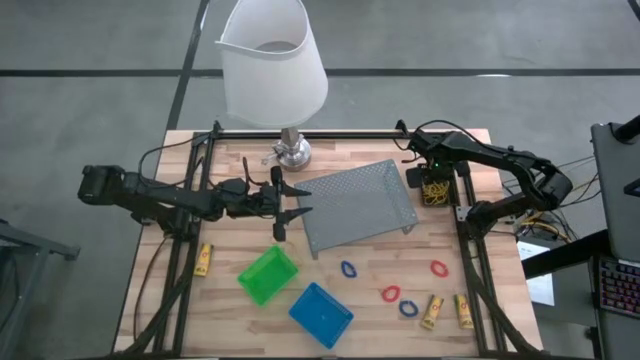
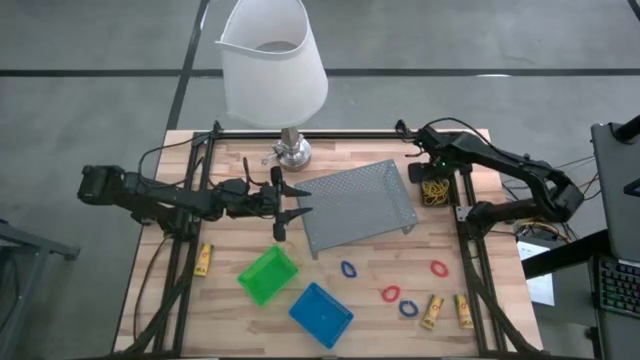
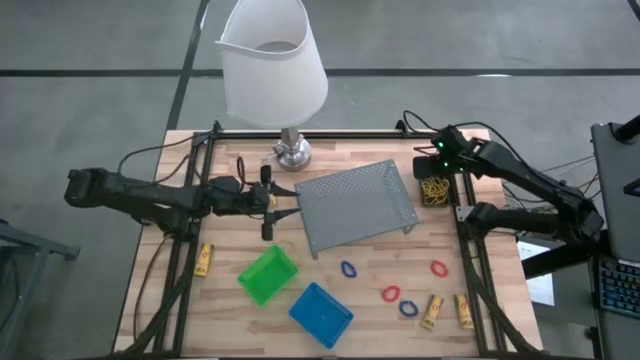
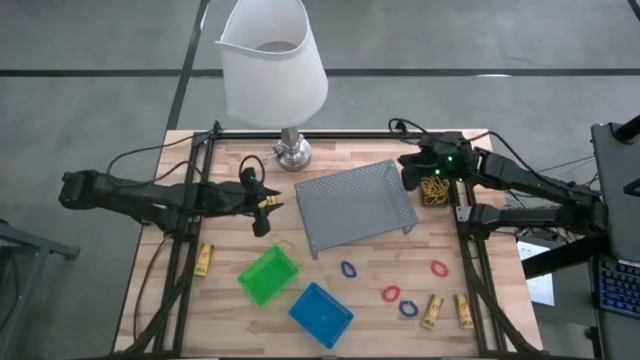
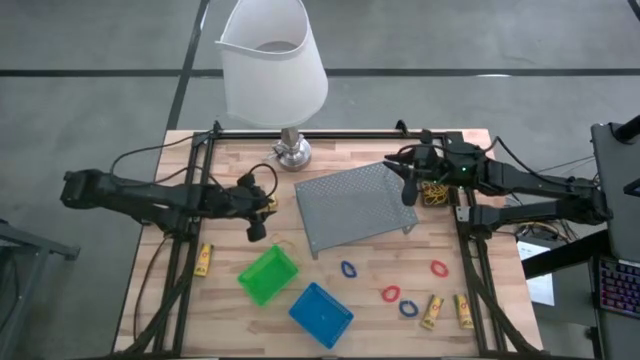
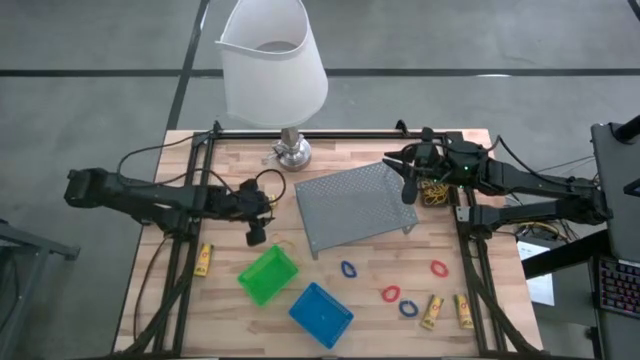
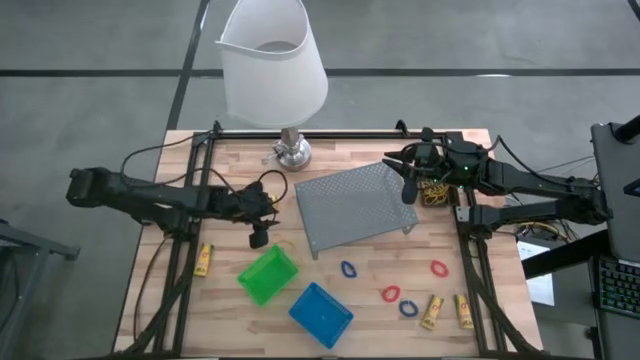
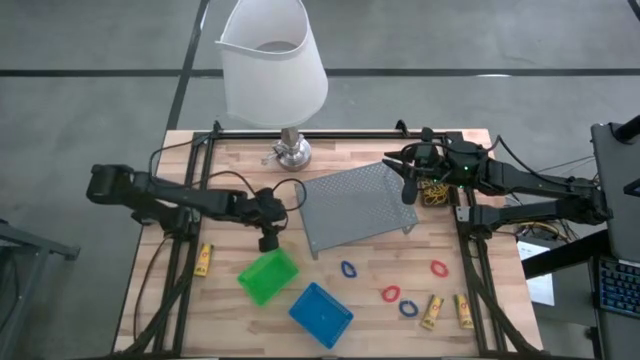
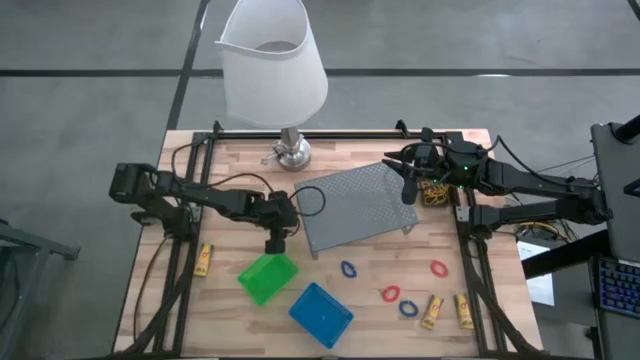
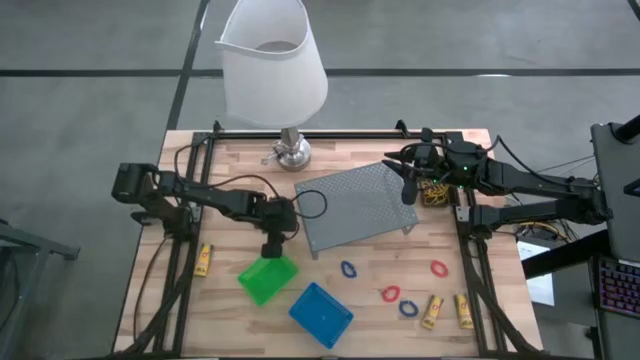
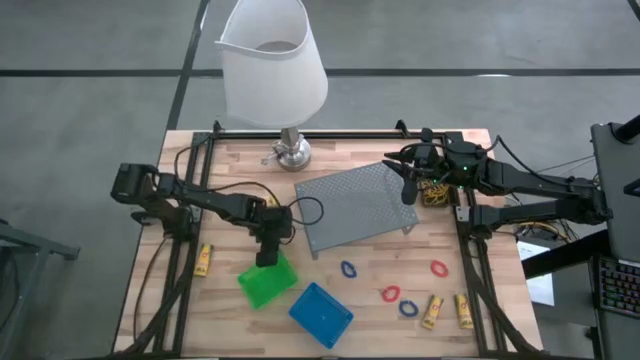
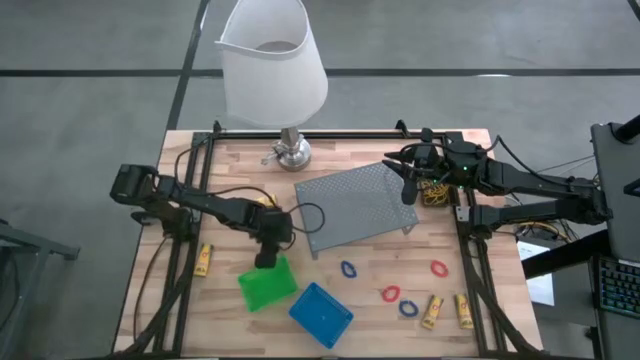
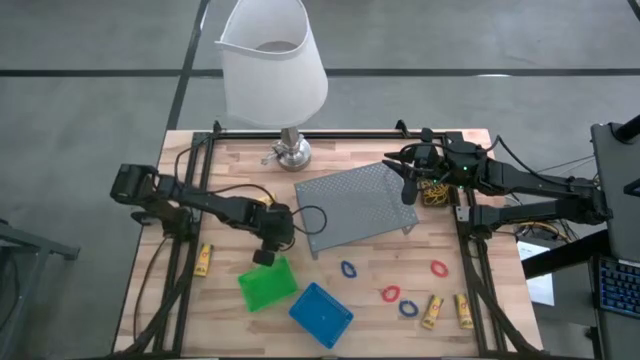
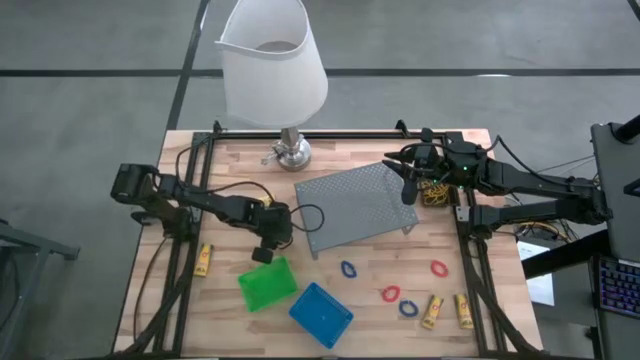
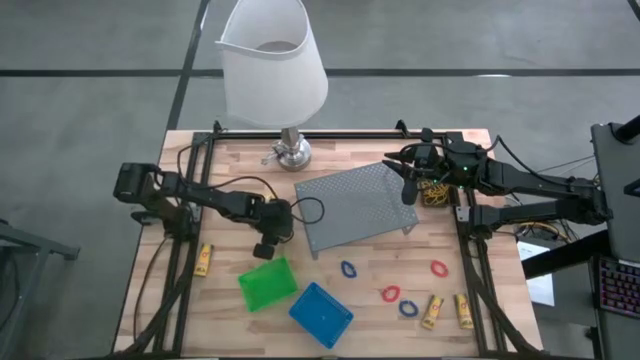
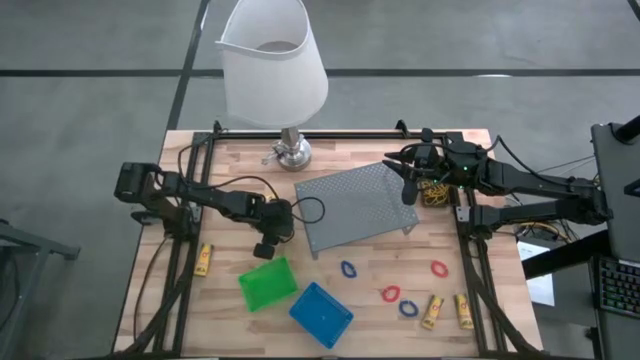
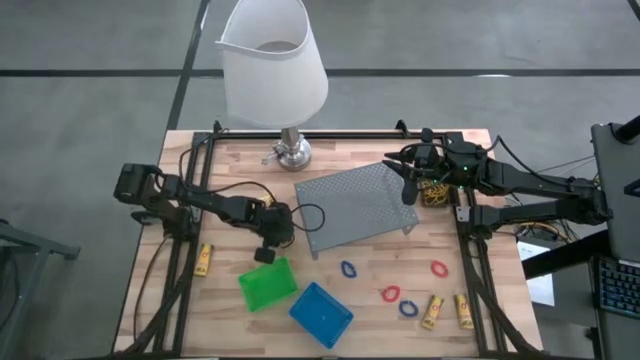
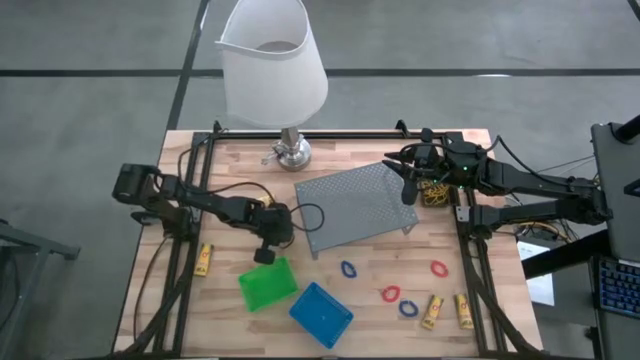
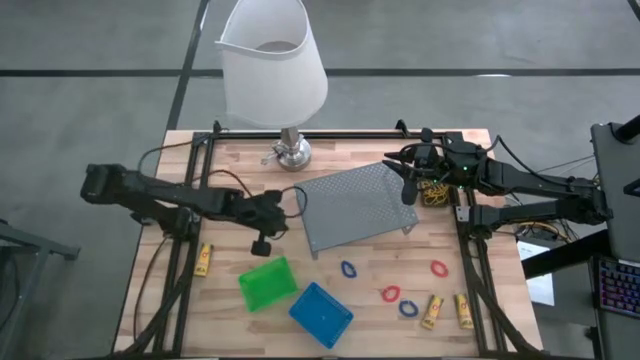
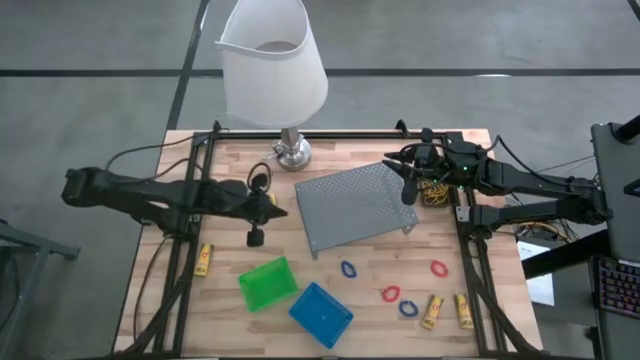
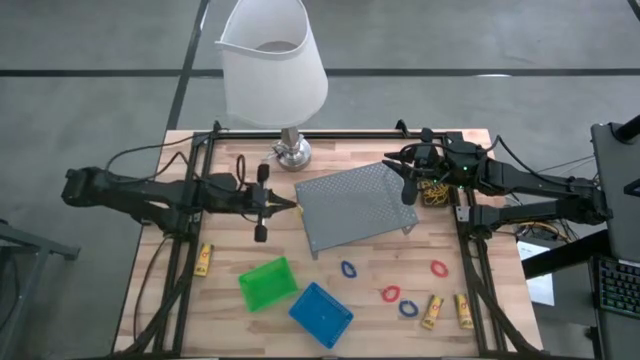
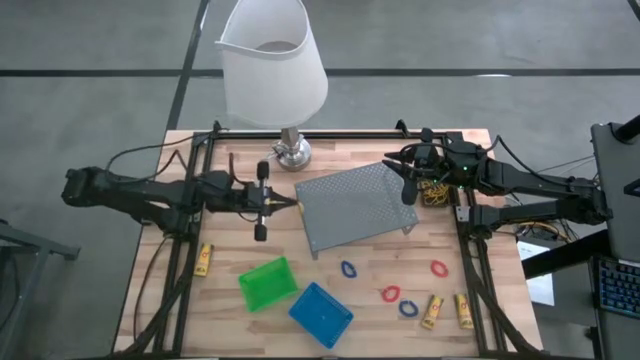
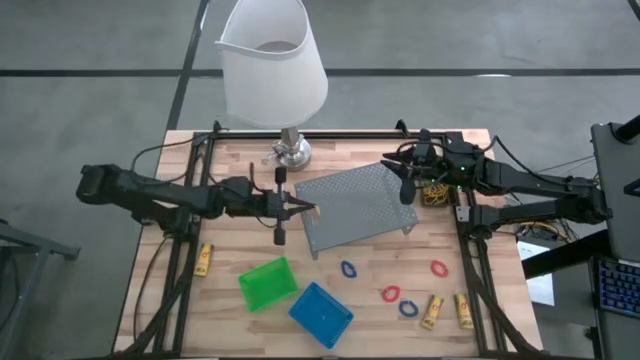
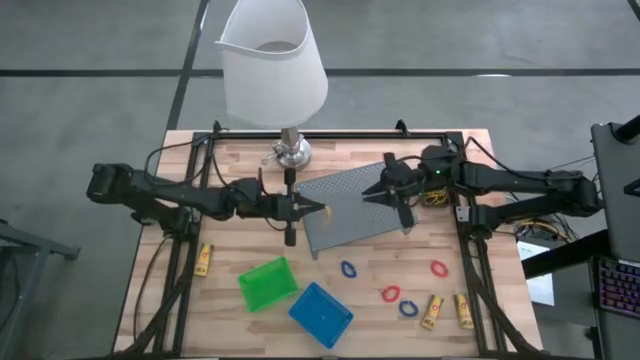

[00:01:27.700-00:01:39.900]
Task: Pick & Place Office Desk Supplies
Put the yellow rubber band into the black basket

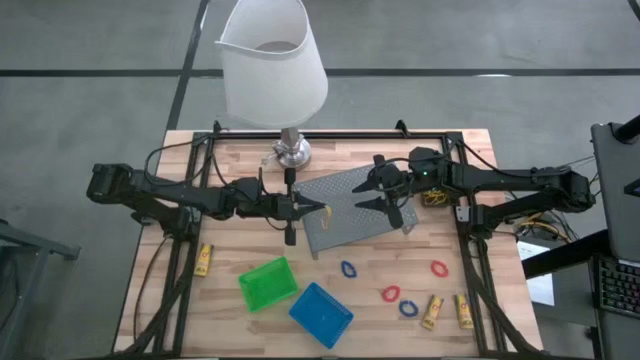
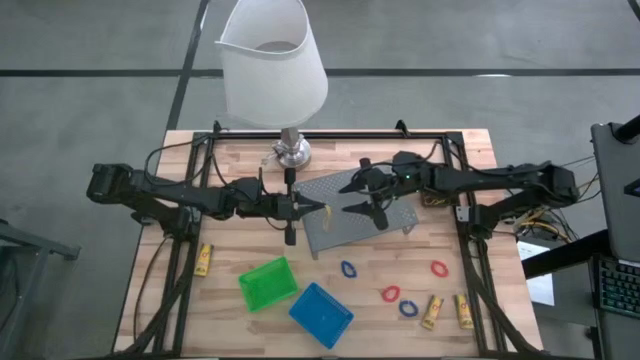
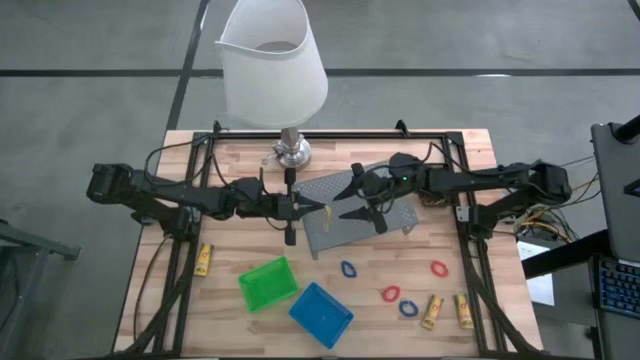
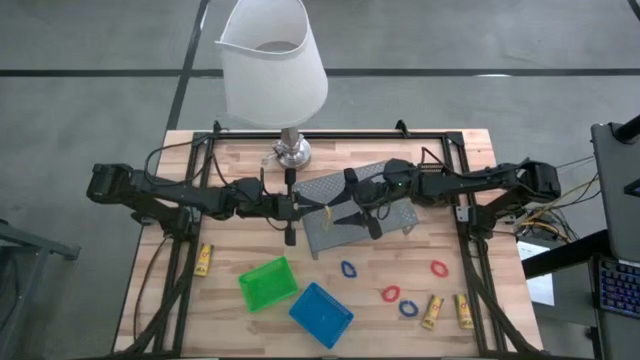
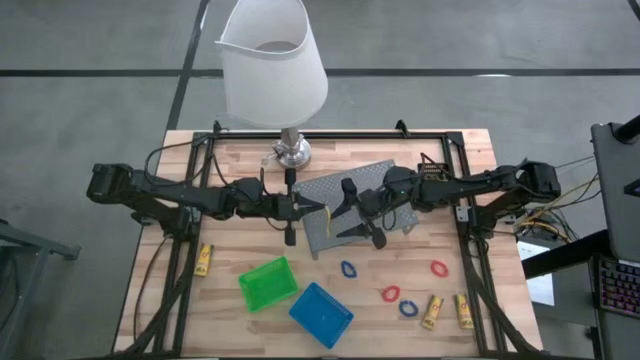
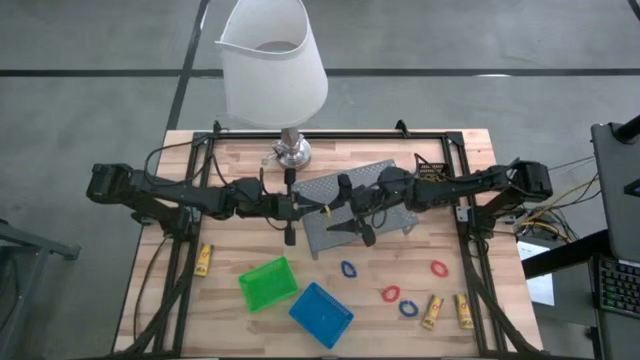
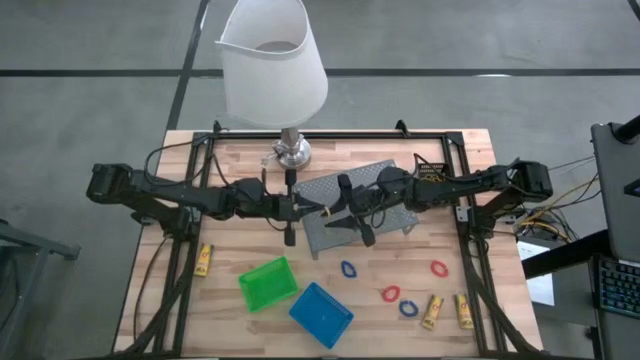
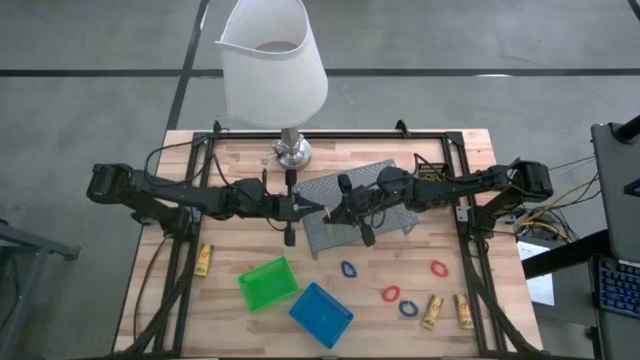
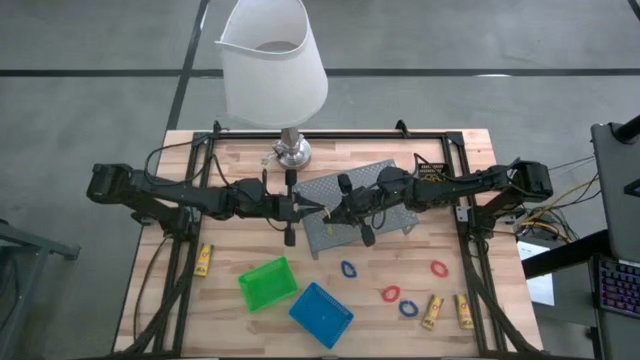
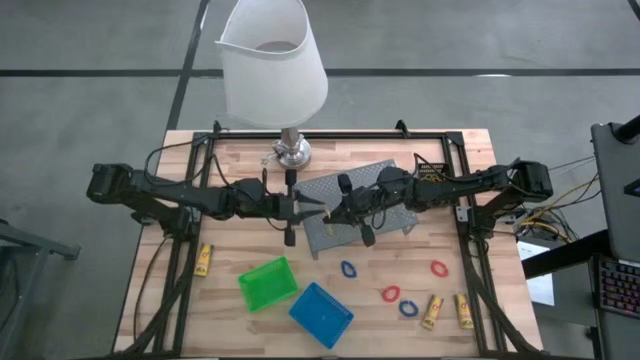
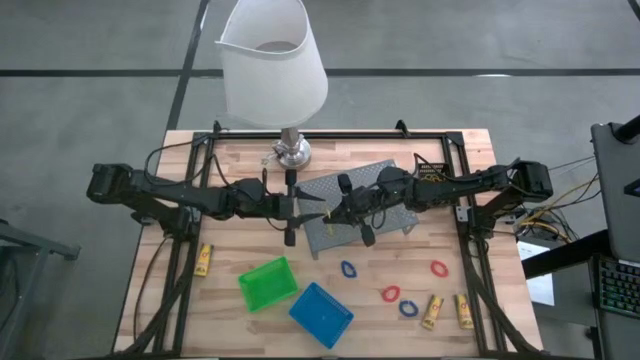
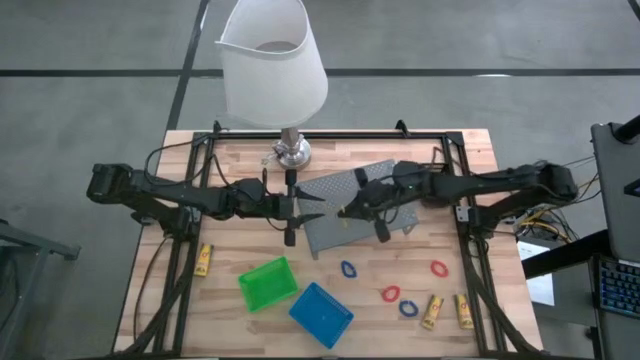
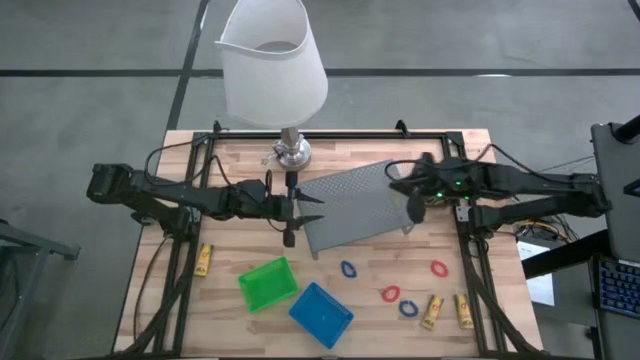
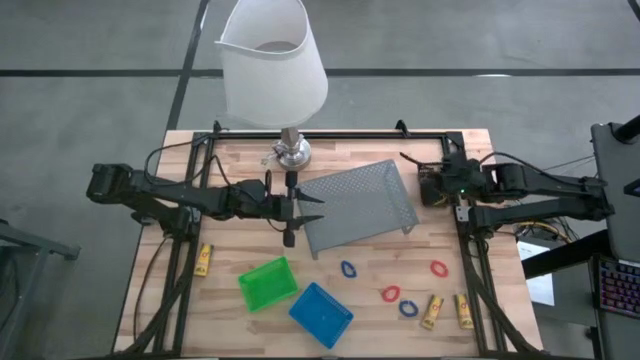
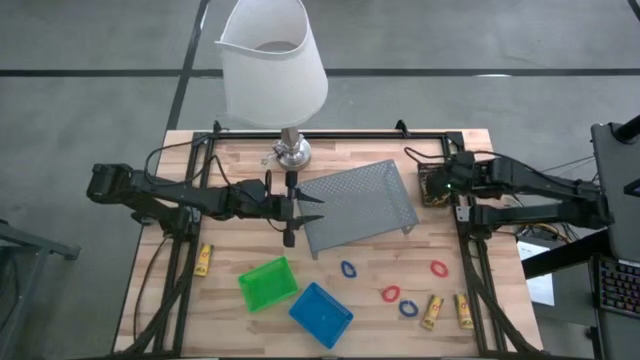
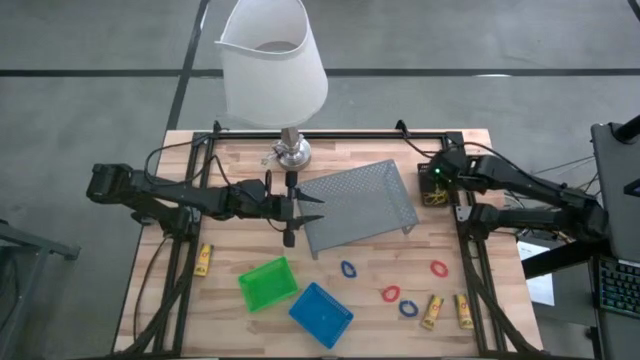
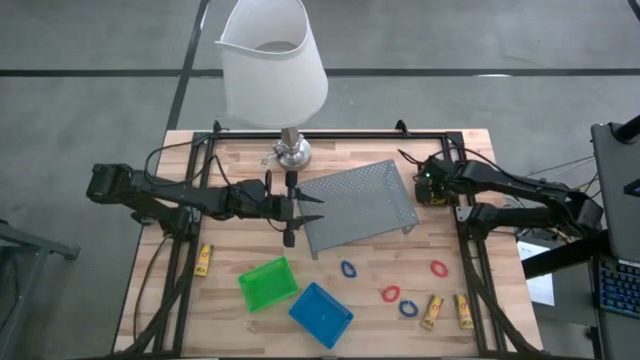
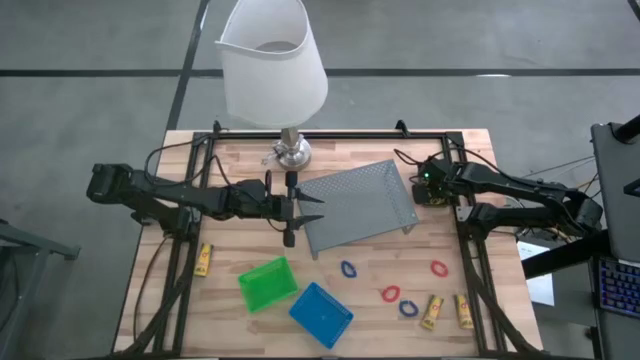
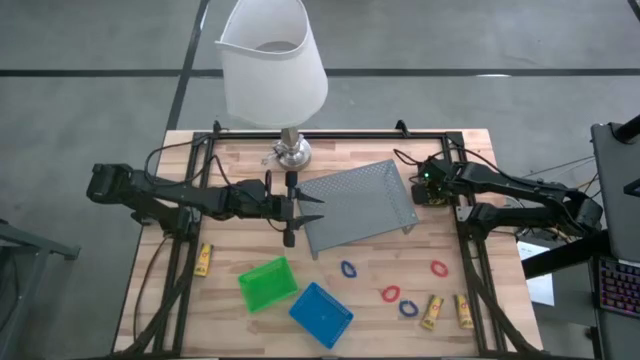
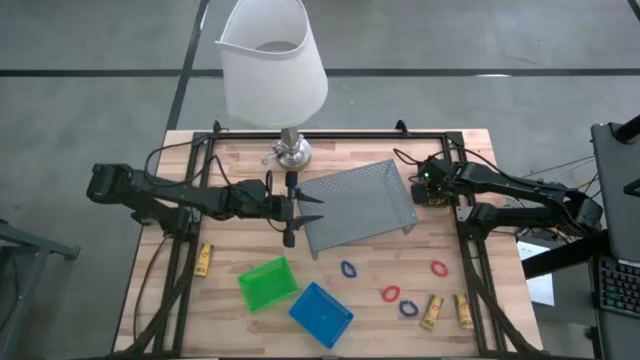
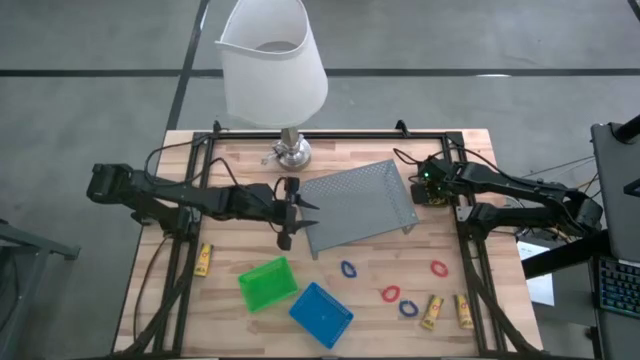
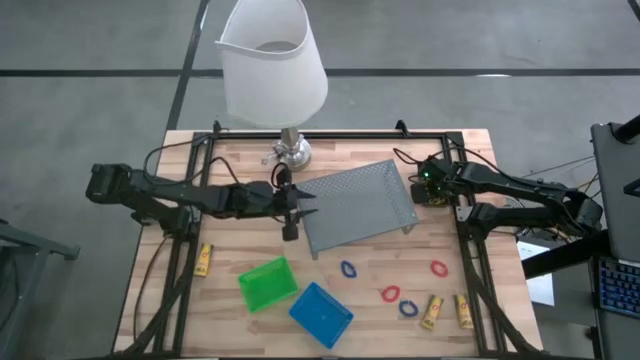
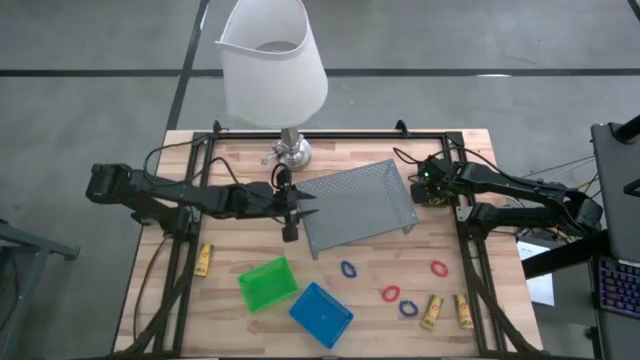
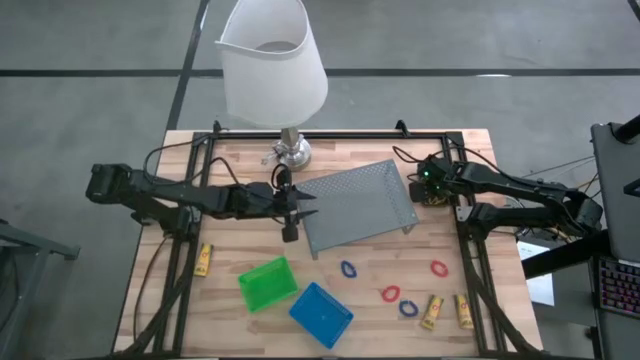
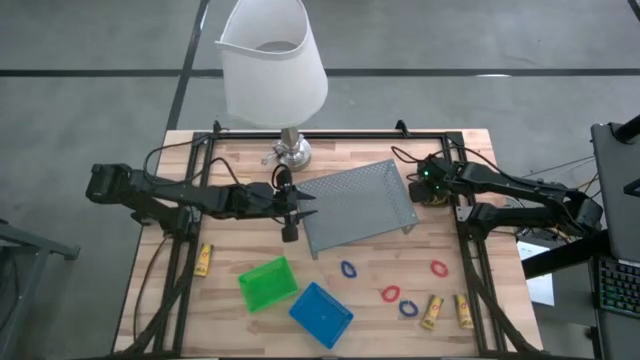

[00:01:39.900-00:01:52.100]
Put the yellow rubber band into the black basket
